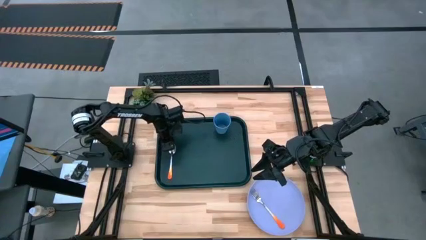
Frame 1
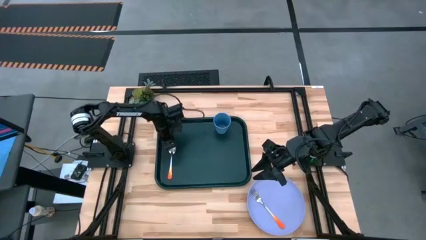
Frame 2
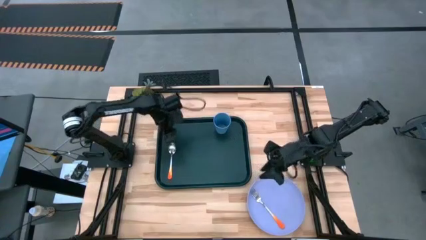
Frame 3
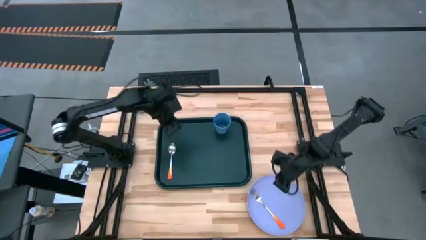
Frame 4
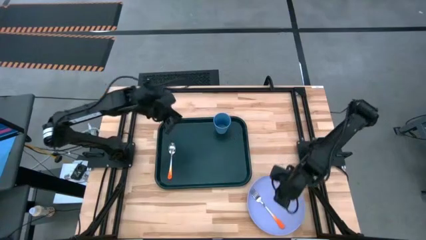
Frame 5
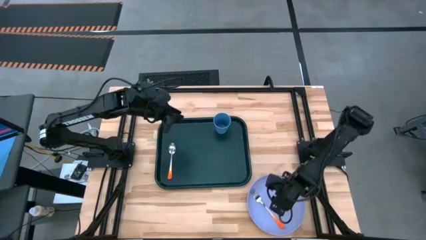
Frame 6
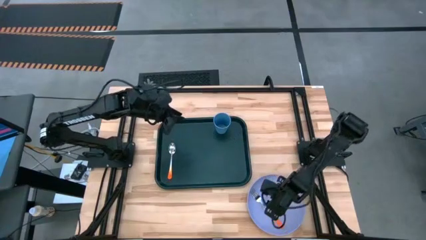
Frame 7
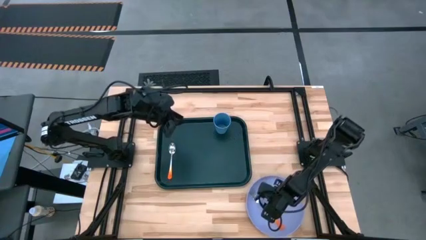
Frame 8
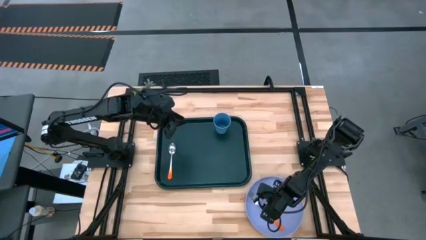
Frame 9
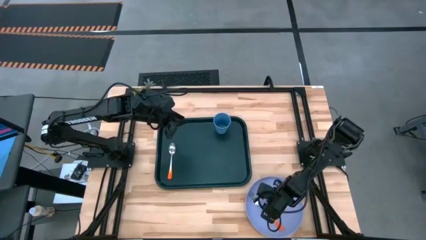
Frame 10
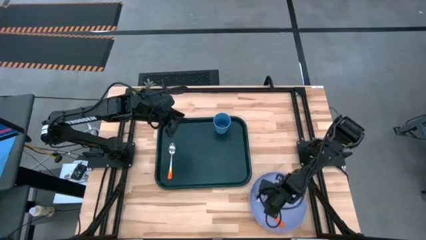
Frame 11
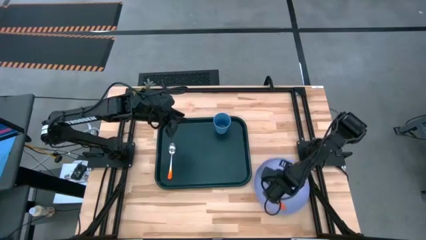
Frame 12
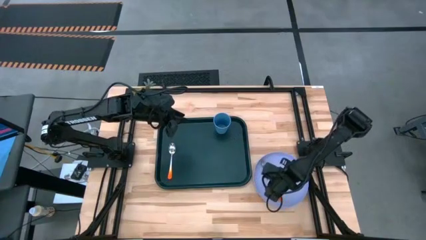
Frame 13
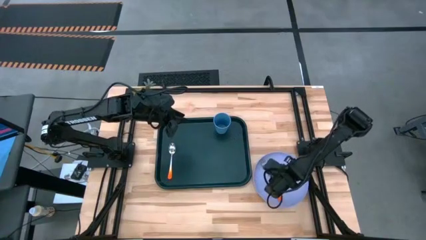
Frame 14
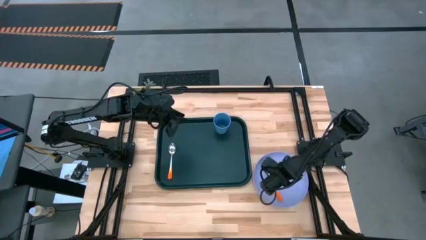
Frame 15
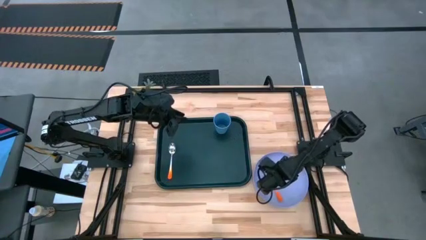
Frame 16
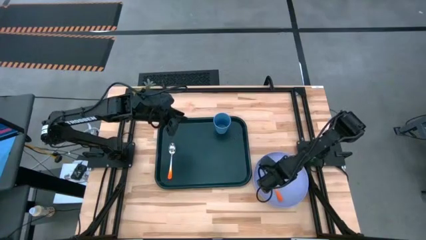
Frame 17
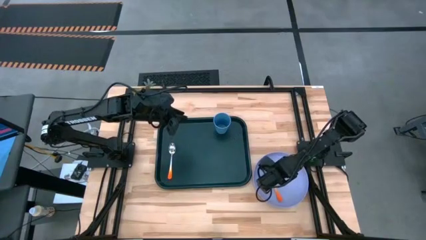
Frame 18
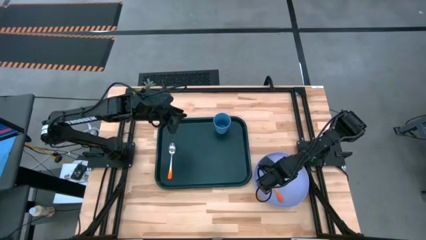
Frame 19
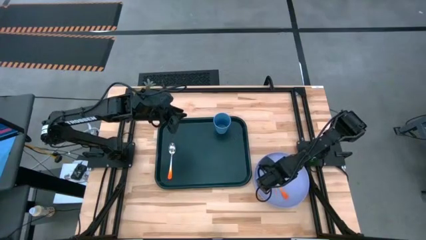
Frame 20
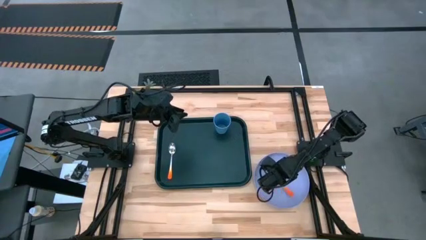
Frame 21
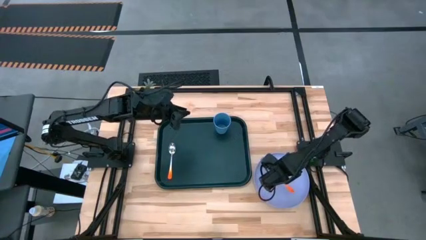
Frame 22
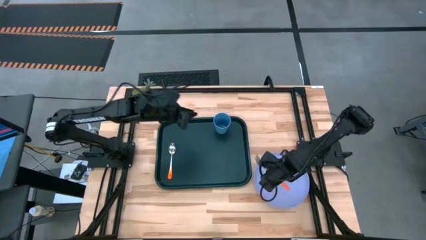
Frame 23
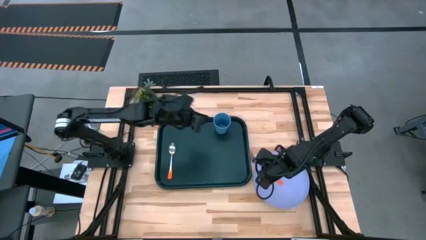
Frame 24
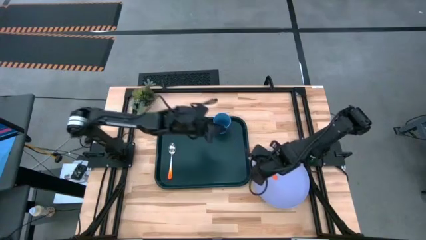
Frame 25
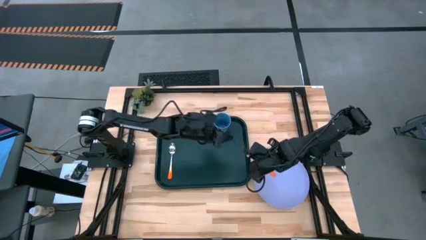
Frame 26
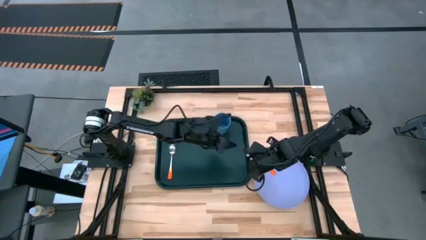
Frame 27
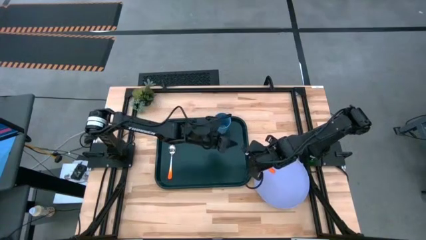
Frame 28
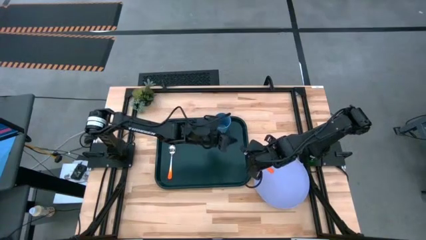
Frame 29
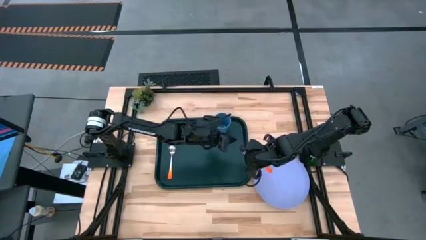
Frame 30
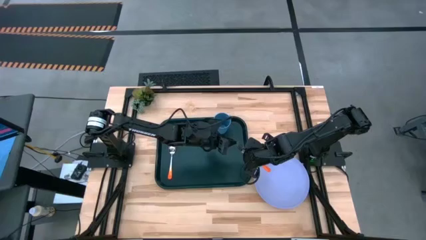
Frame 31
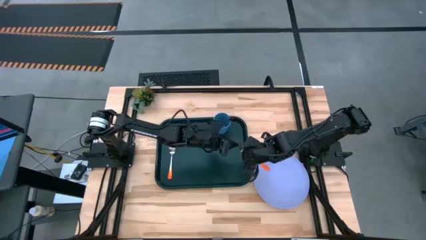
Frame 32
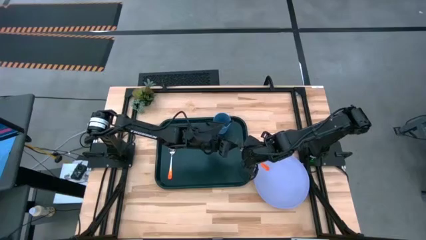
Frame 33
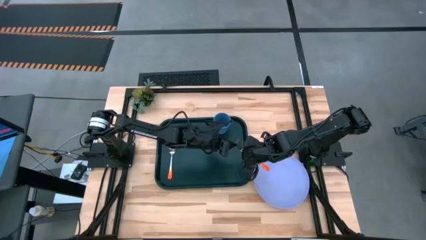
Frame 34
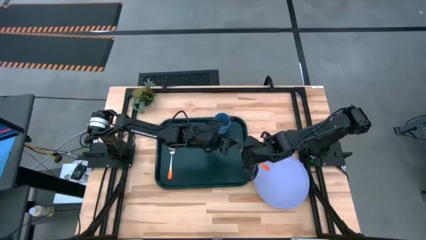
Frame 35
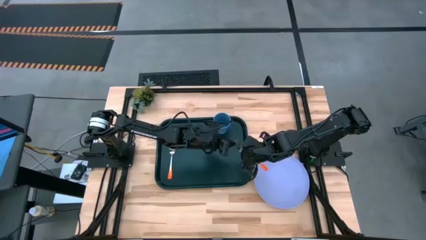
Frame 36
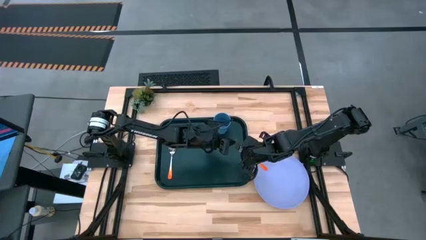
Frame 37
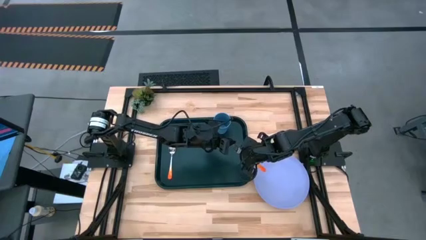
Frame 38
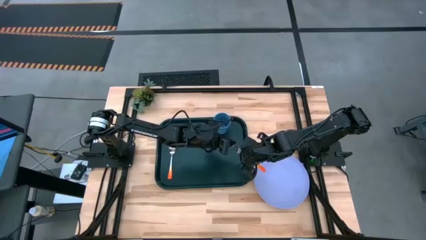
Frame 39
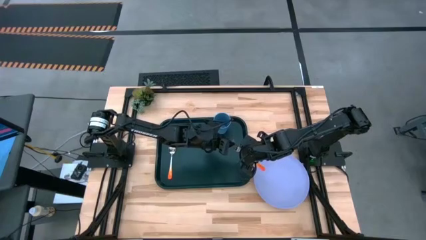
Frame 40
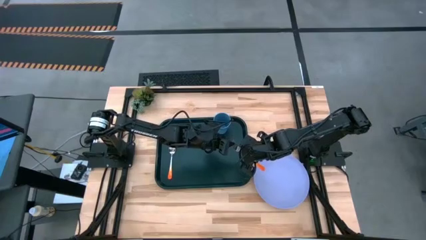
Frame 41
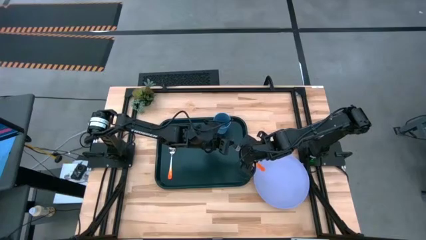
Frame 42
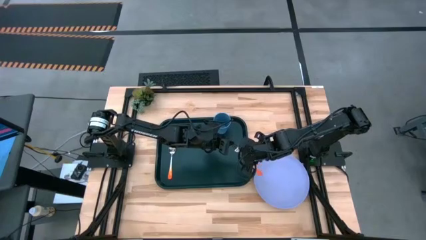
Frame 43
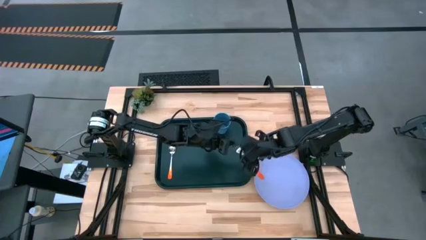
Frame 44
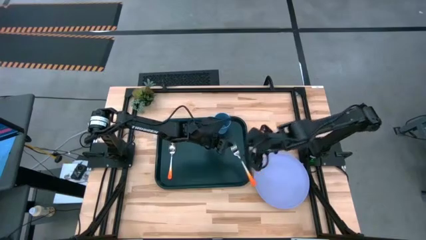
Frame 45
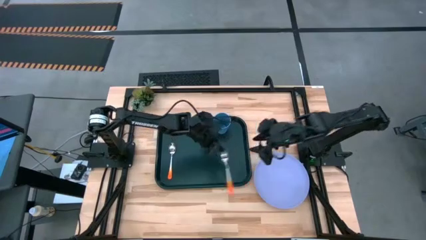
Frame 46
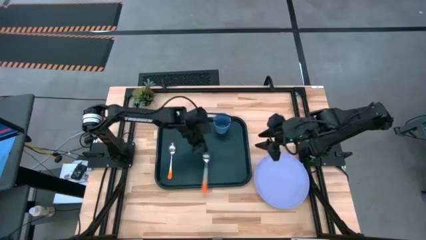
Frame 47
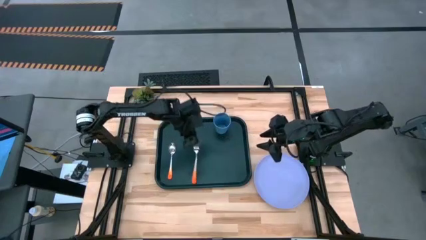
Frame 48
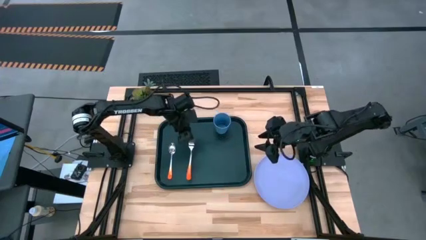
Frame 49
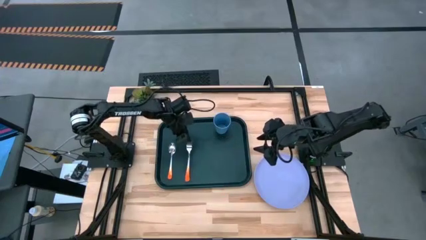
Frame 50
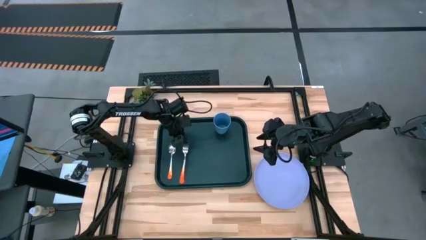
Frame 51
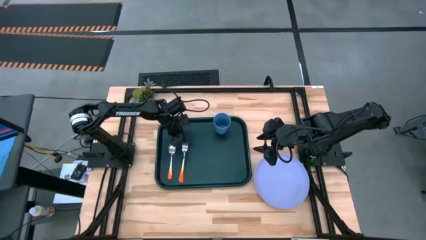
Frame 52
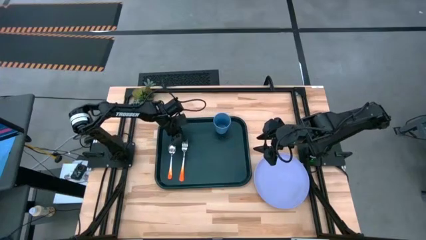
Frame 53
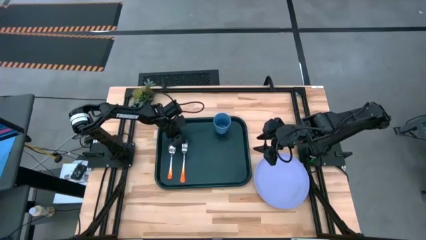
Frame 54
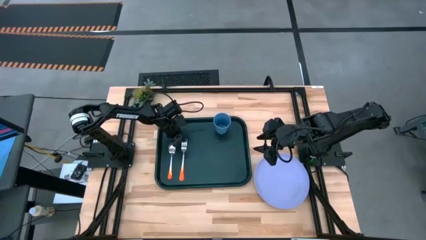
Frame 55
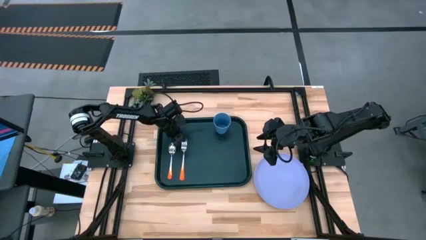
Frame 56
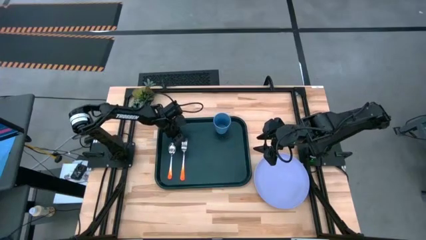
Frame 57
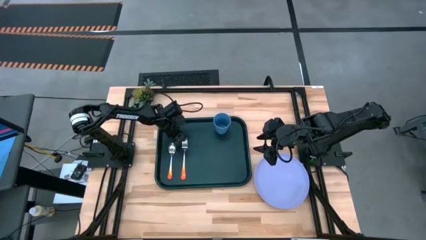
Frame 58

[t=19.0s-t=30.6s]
Task: Pick and place plate/cup/fork/spoon on tray
Put the orange fork on the black tray to the right of the orange spoon

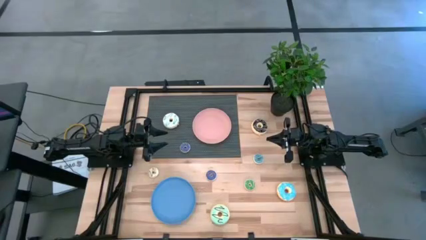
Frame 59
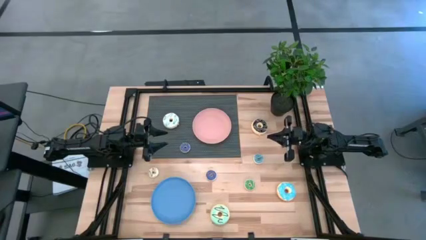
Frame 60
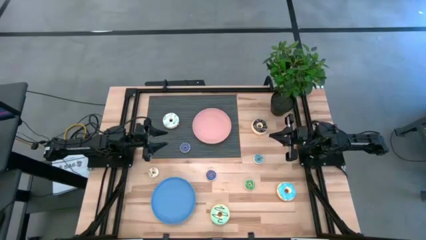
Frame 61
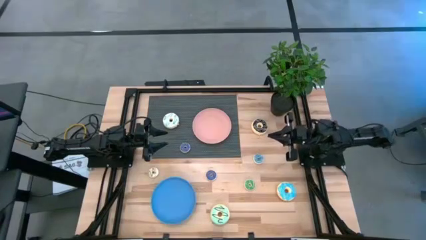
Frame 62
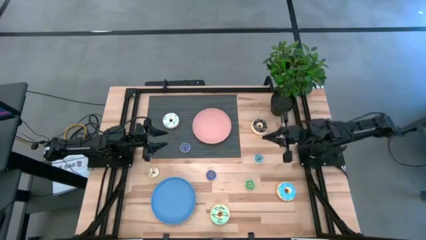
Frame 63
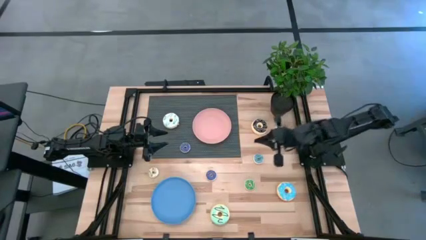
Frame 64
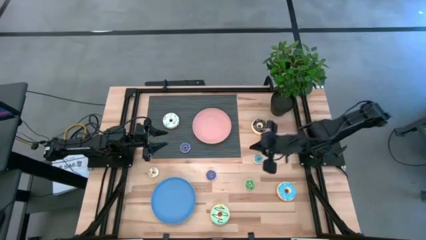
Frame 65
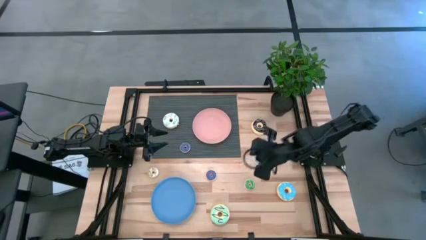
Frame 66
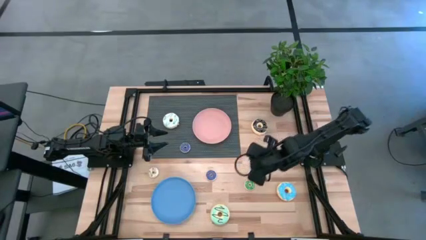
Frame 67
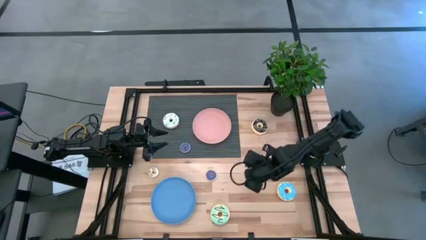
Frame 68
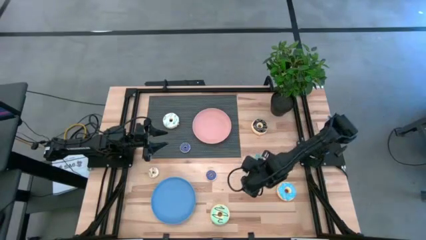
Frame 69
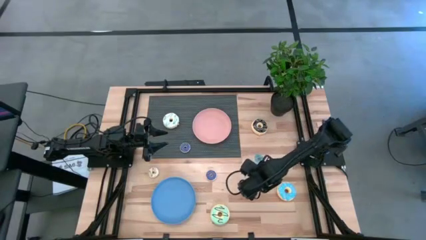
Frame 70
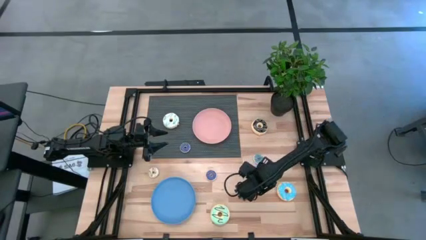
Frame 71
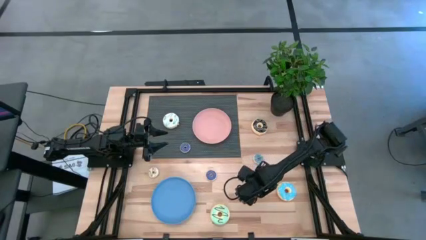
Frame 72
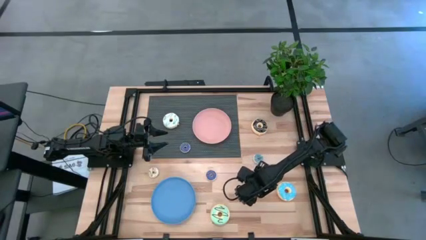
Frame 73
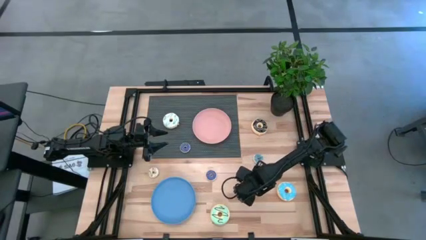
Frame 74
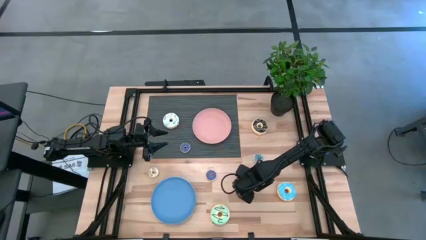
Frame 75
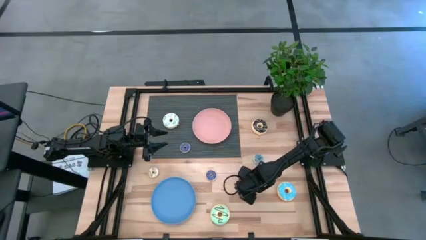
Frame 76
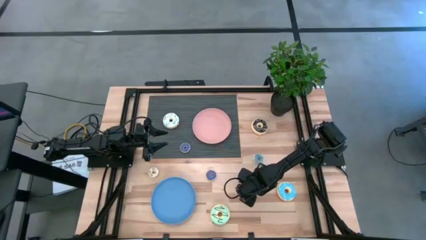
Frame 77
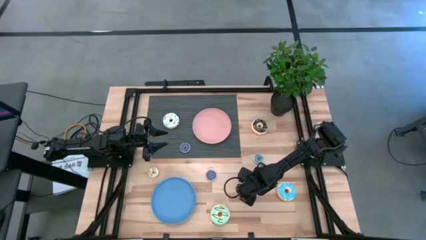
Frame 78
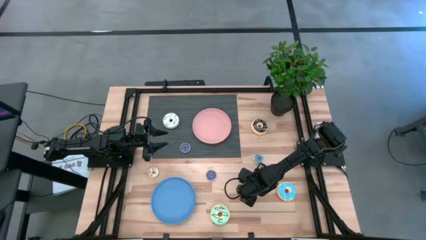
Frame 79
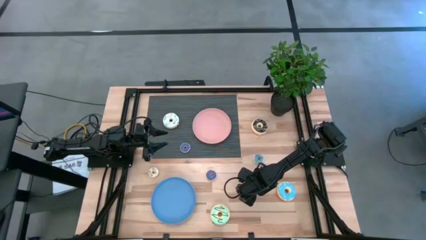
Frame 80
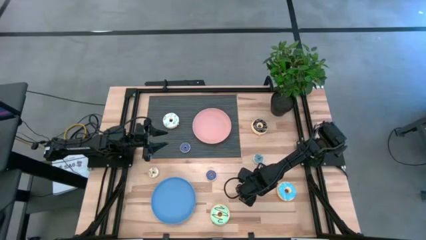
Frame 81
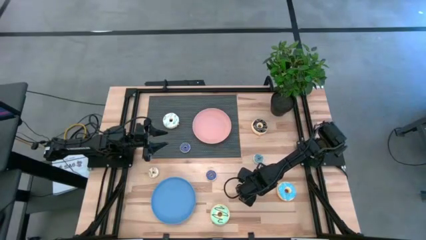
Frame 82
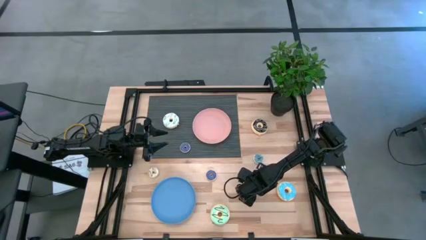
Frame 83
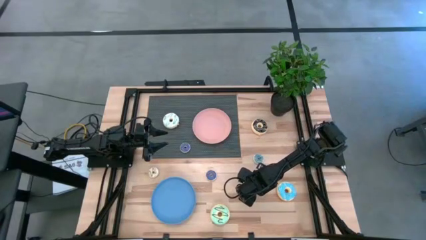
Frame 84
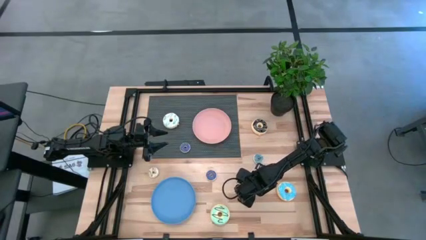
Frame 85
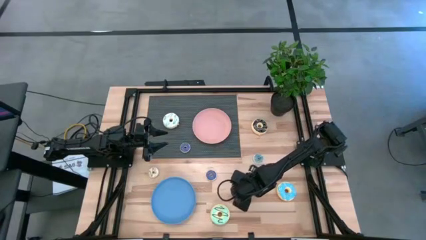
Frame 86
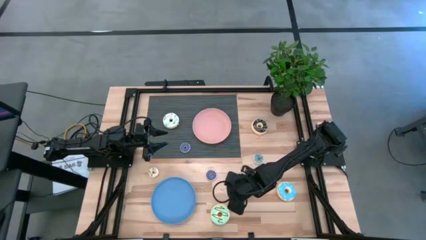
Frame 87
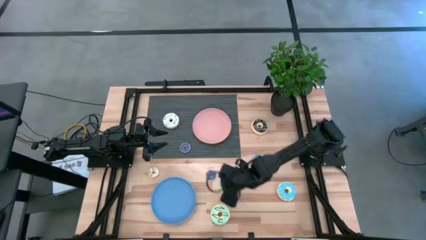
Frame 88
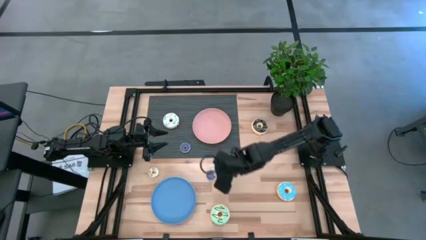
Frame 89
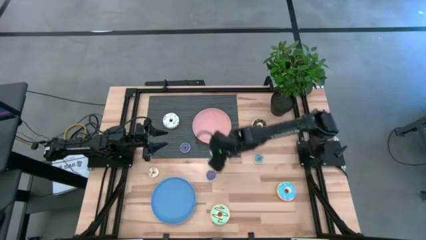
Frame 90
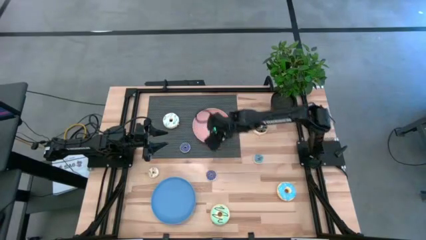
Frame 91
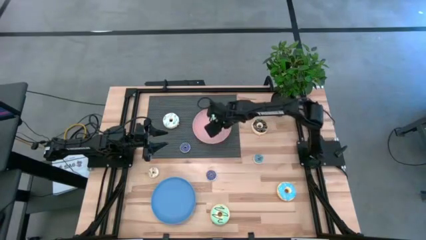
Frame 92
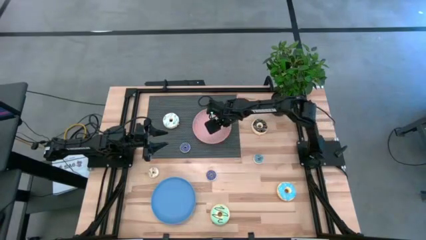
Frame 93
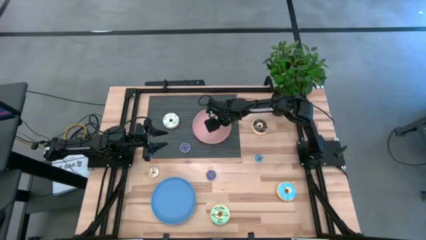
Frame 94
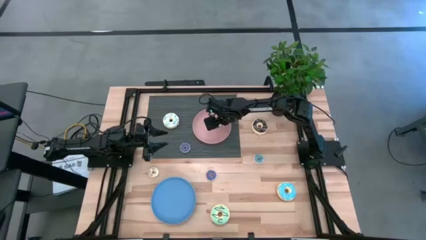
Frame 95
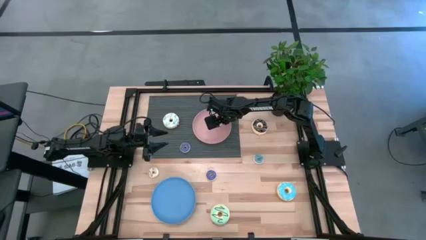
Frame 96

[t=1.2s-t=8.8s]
Task: Pick & Place donuts
Put the small green donut on the pink plate
